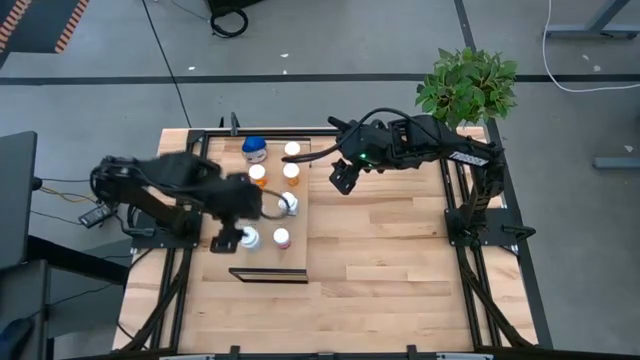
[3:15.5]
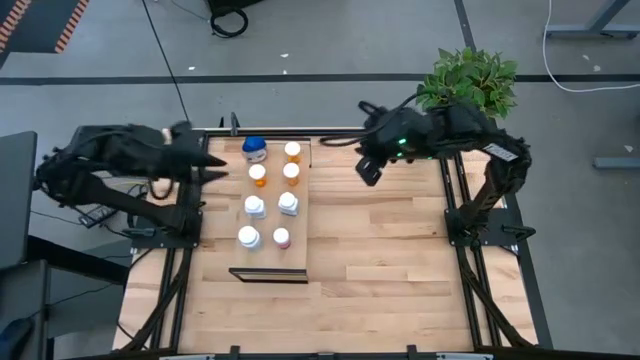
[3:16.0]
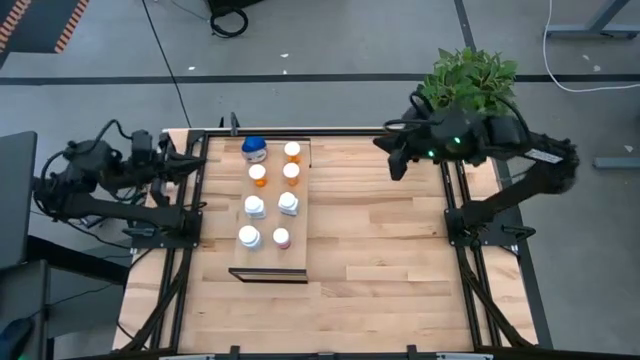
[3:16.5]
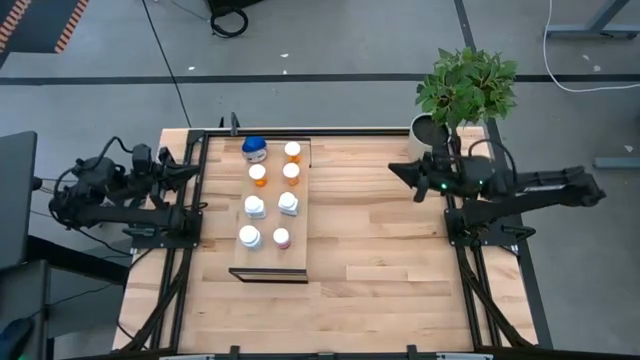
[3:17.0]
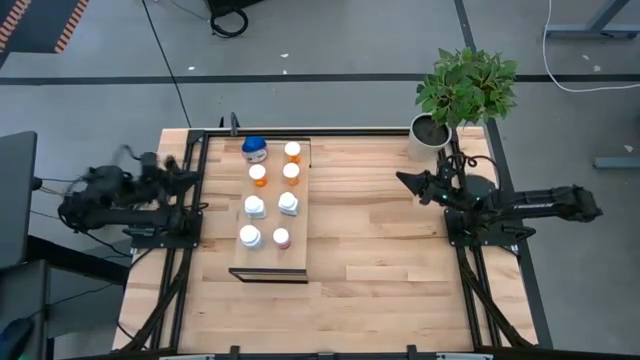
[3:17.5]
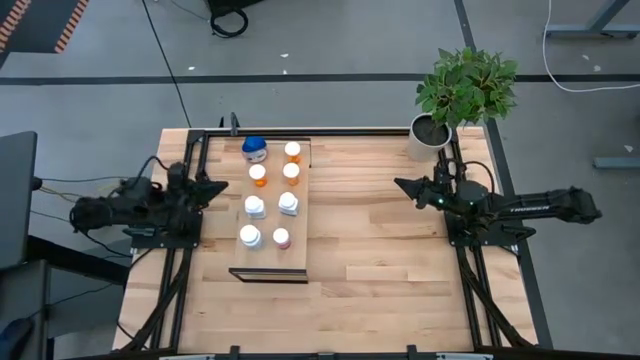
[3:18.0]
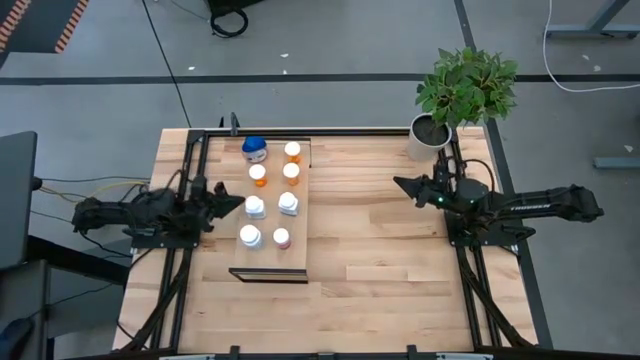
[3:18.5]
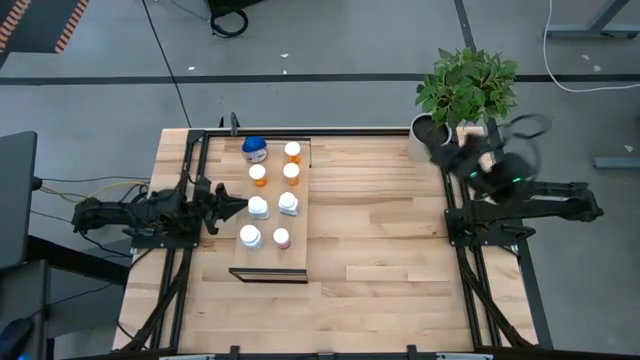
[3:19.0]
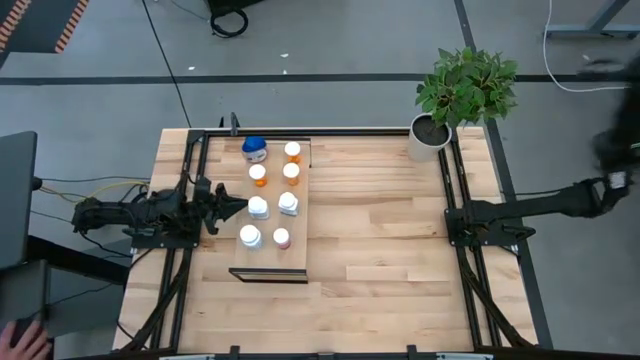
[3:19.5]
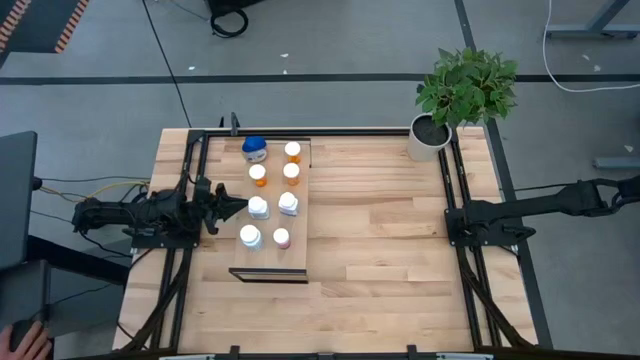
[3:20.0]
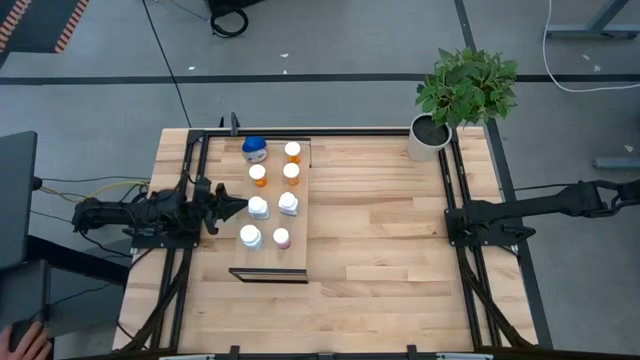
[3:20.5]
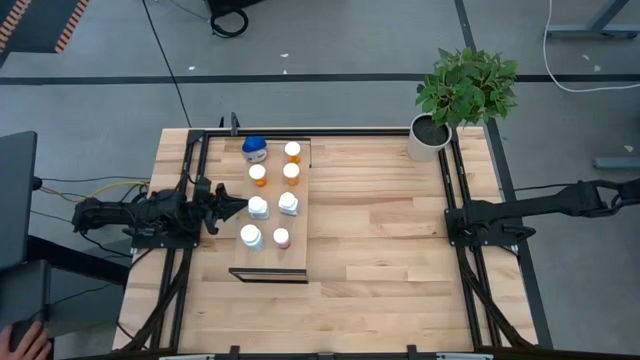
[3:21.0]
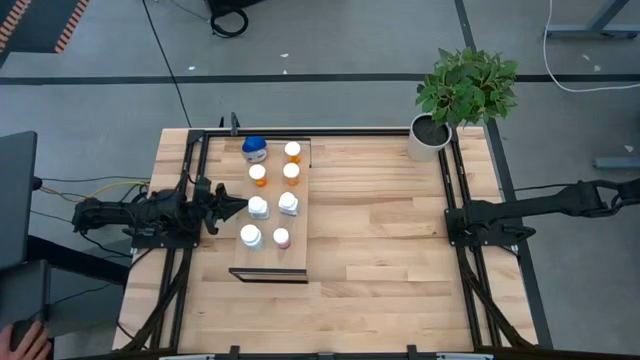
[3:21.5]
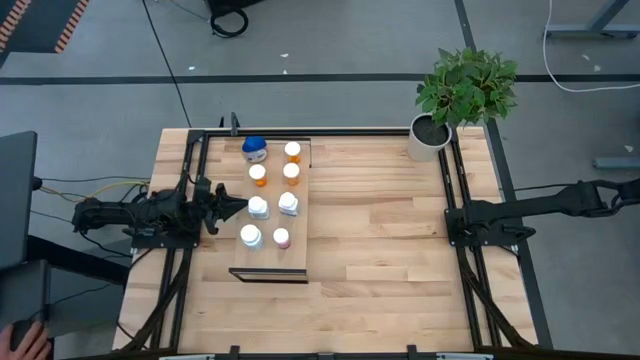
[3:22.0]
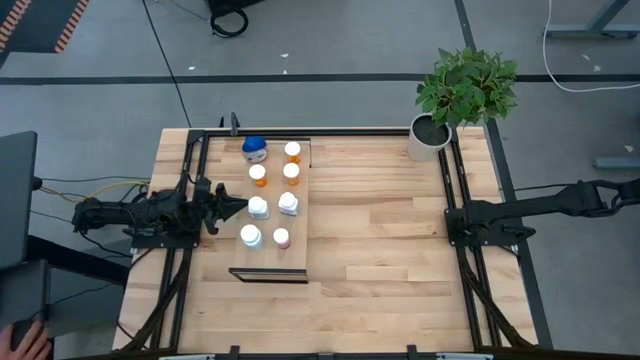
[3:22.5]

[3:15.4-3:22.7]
Task: Pick and place medicine bottles onto shelf by color
Return to Home Position

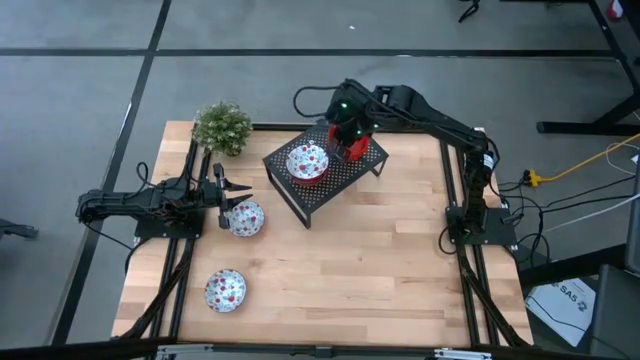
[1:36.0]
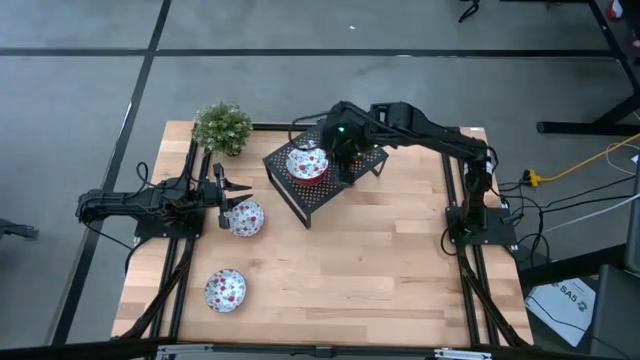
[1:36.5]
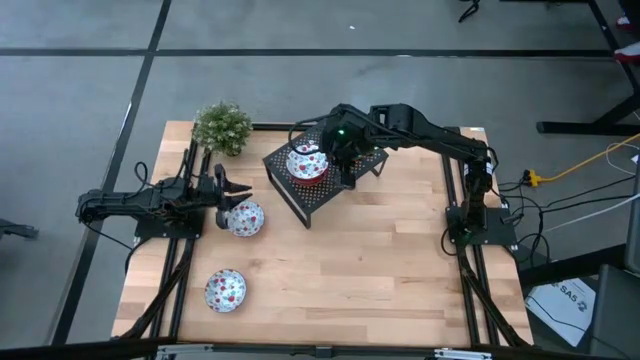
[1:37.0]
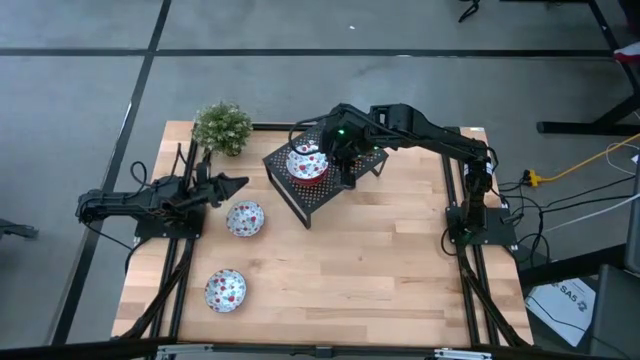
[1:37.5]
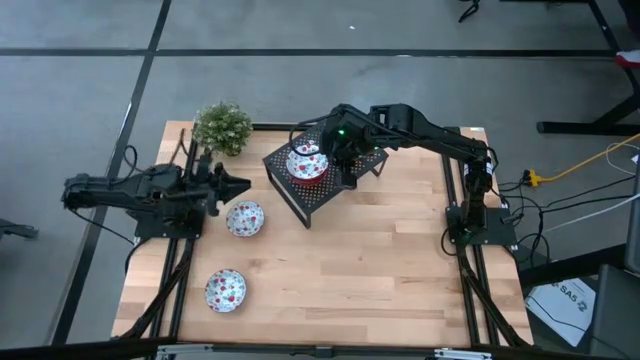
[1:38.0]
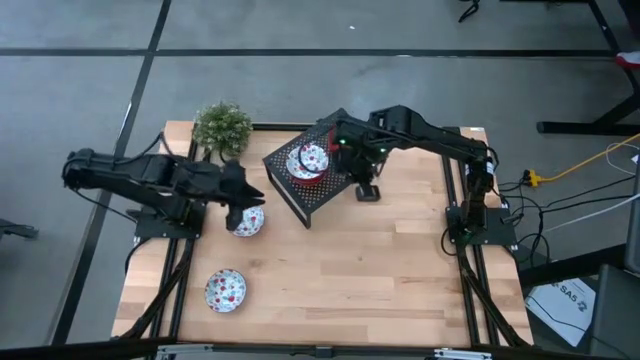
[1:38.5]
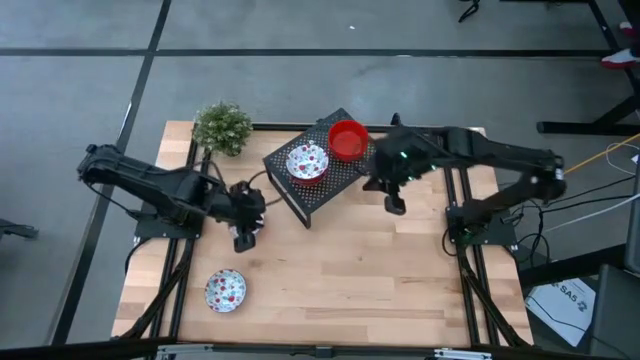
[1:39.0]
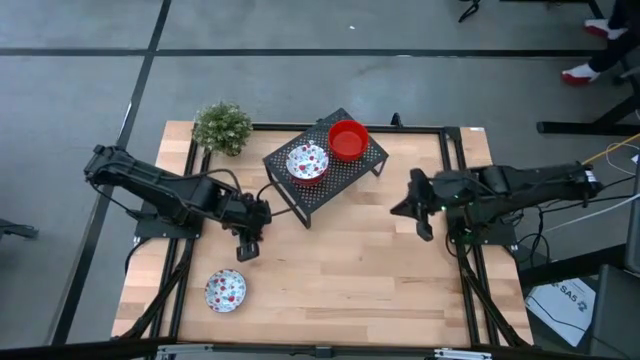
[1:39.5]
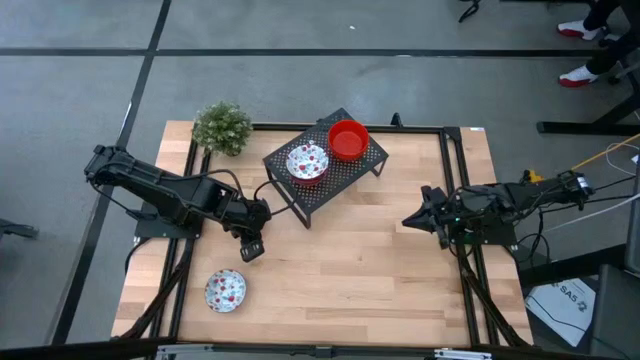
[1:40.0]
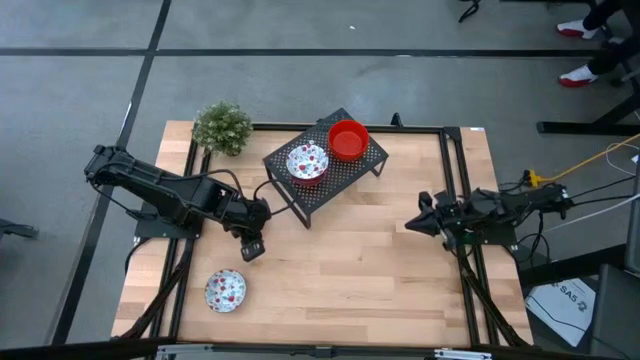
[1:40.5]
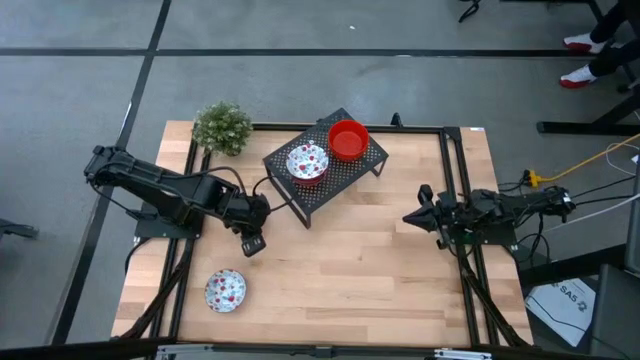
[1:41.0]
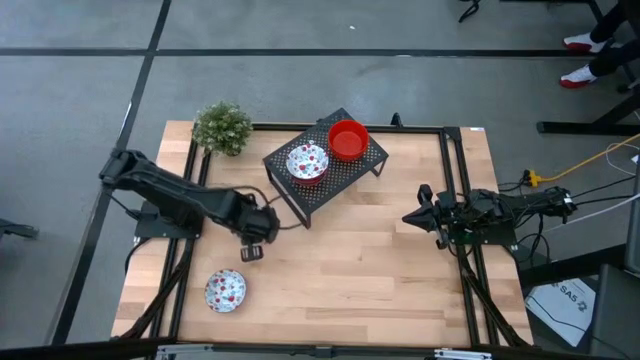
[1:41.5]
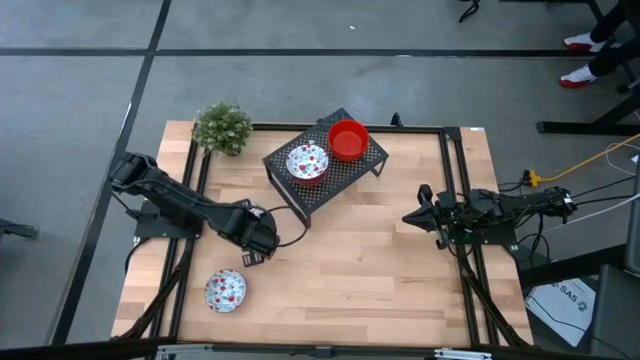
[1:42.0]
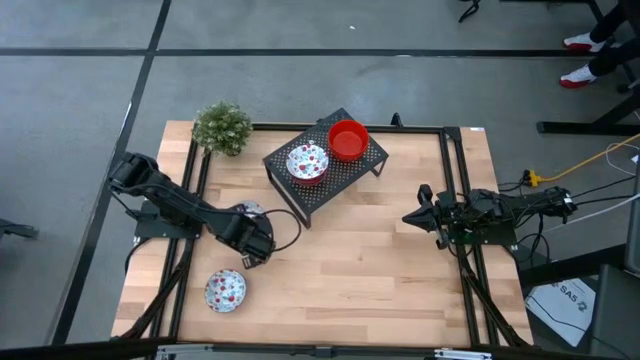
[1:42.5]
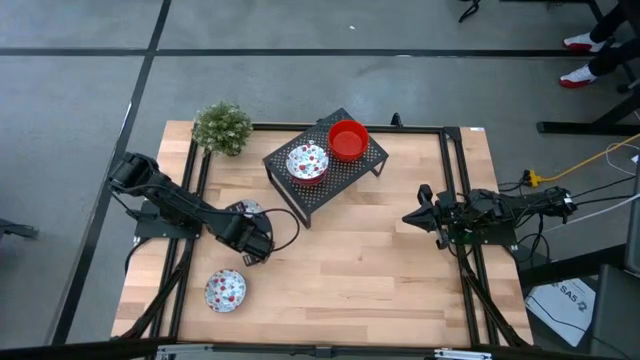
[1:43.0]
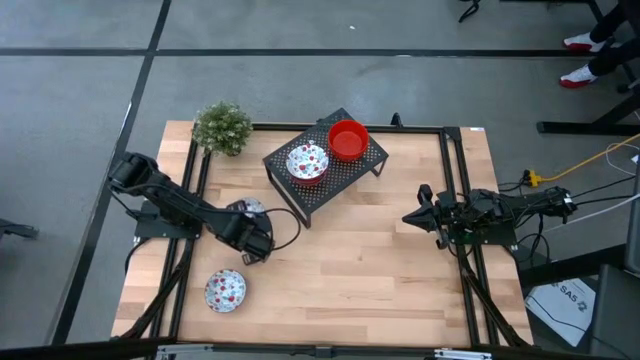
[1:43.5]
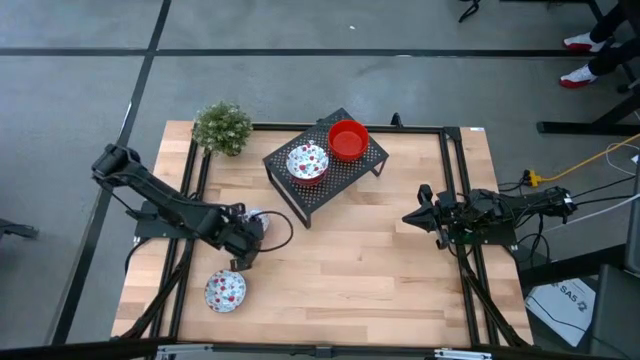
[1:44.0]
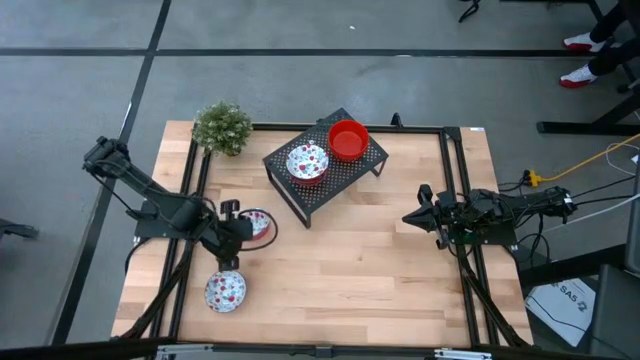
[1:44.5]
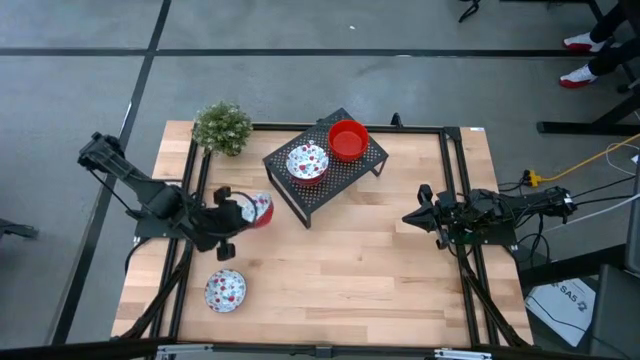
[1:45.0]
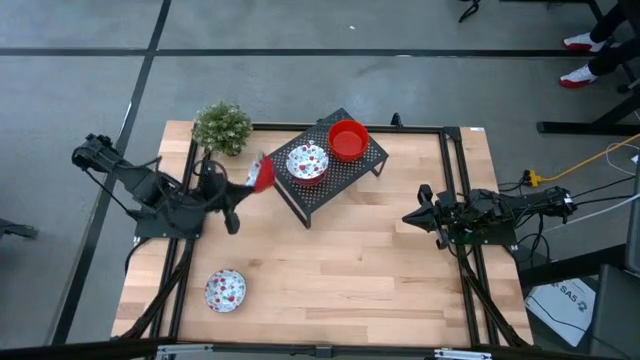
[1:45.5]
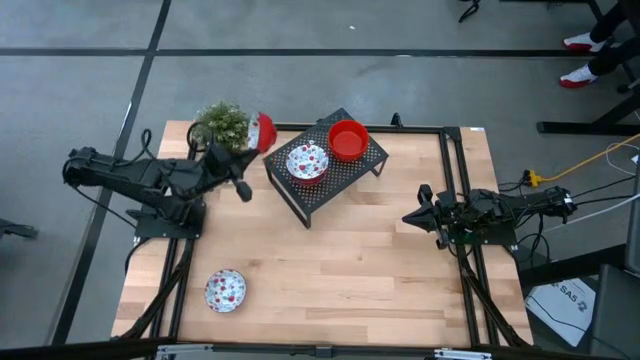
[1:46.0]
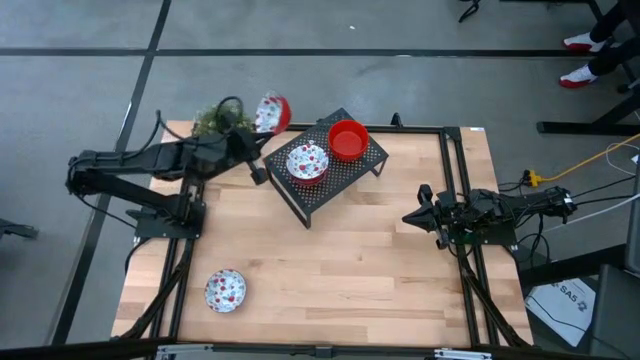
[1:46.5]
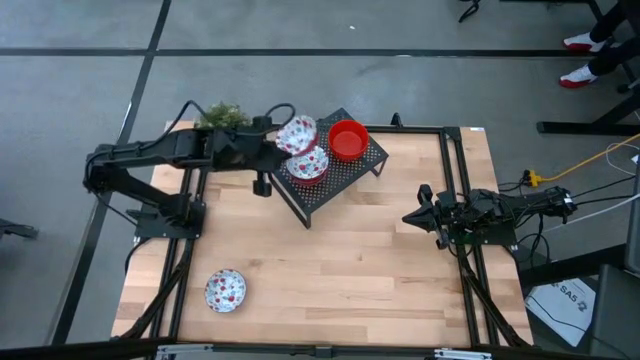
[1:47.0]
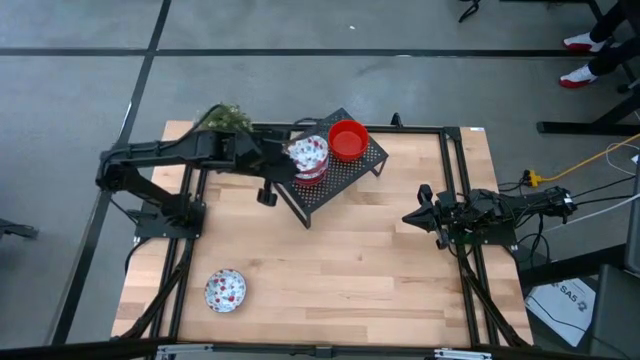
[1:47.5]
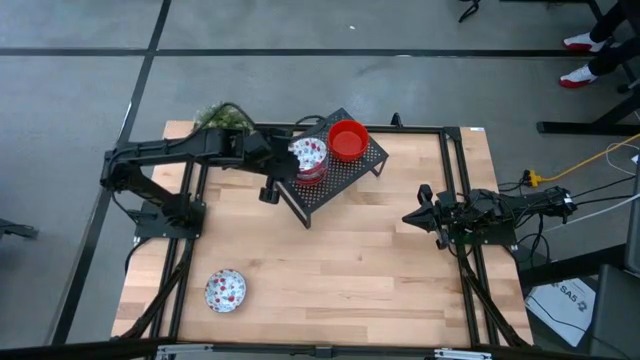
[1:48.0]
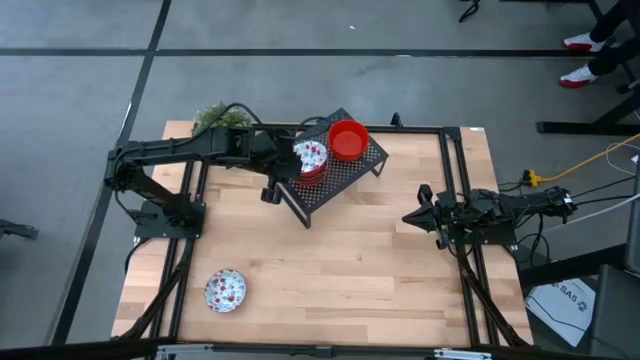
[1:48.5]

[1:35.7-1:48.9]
Task: Pick & Place Mini bowls
Stack the white patterned bowl on the white patterned bowl on the shelf

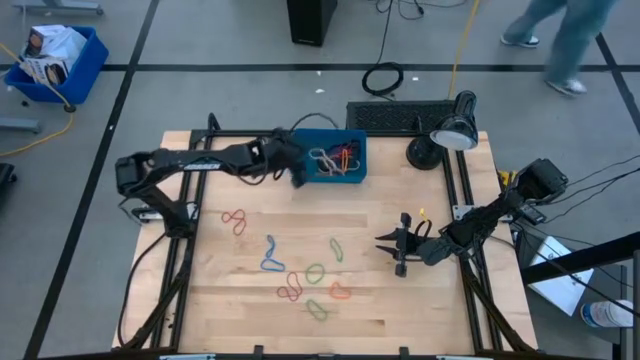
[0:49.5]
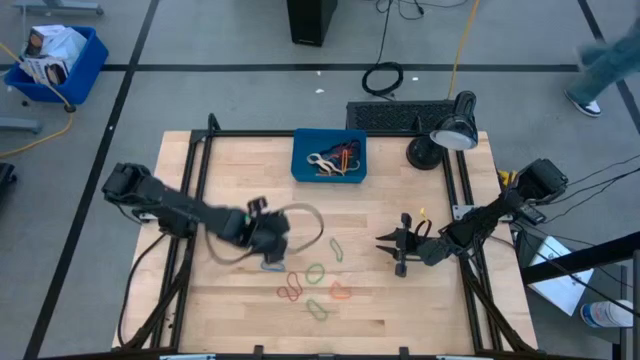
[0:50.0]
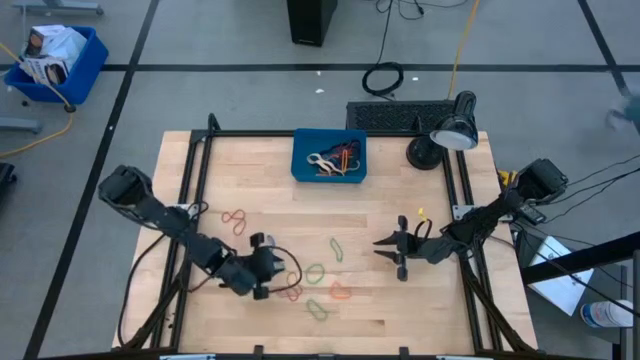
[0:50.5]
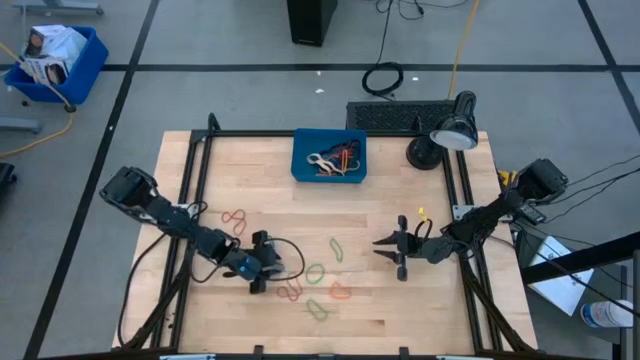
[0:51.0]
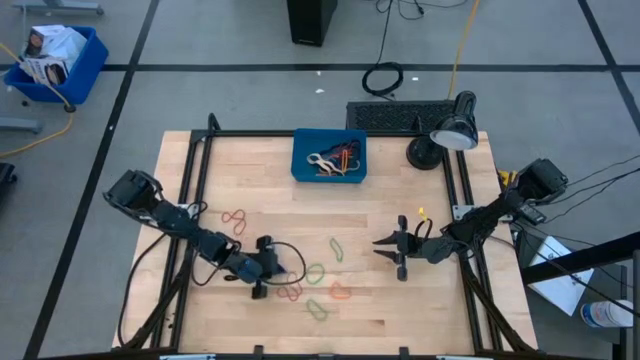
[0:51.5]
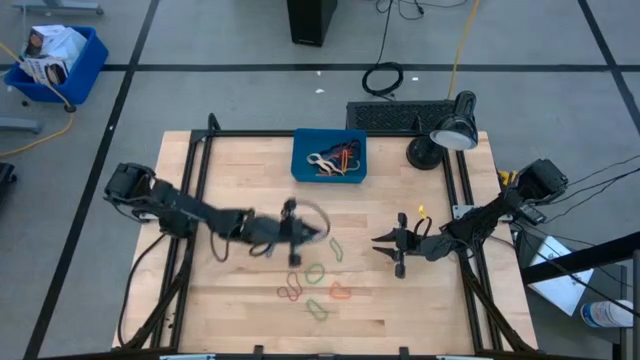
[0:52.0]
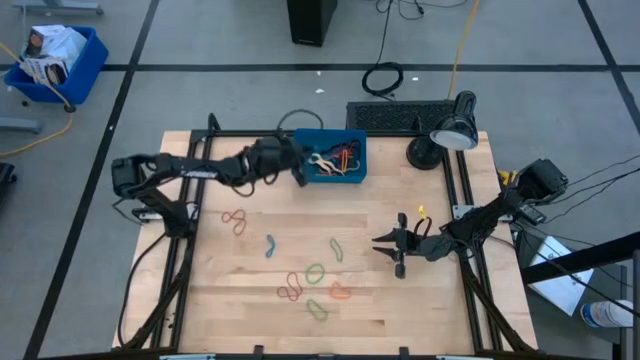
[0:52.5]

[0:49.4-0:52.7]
Task: Pick and place rubber bands into bin
Put the blue rubber band into the blue bin
